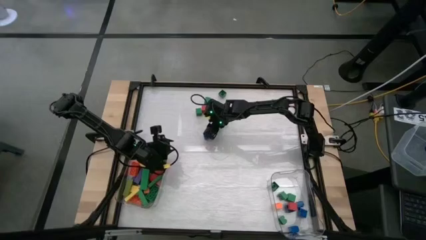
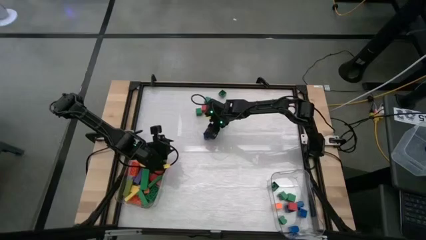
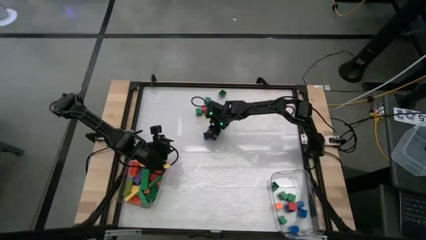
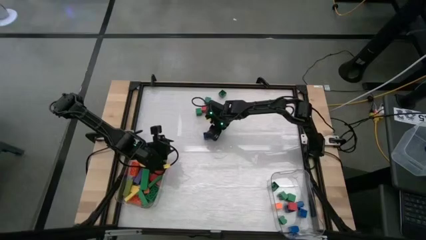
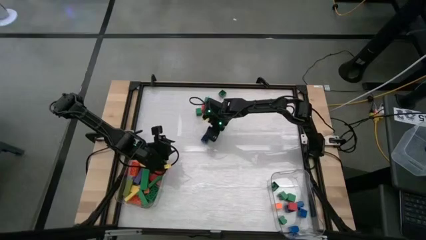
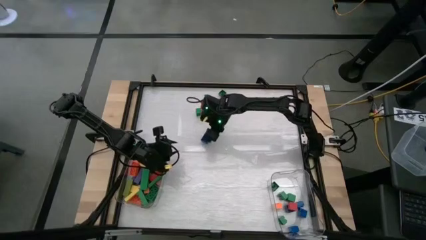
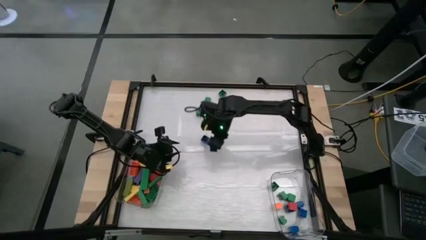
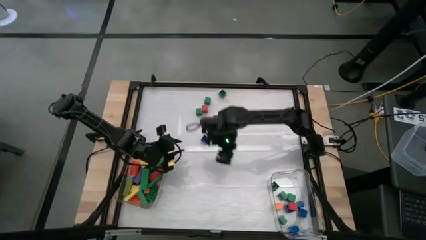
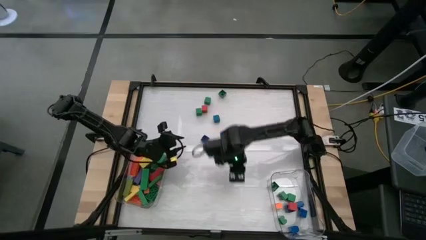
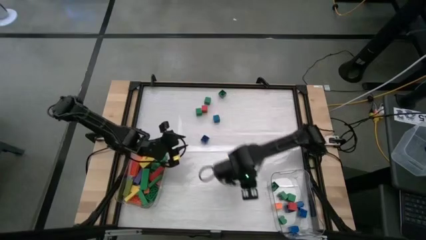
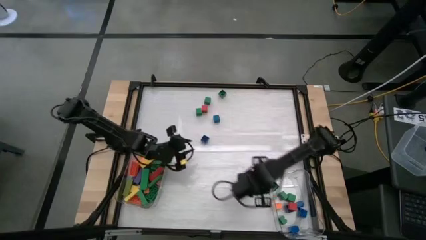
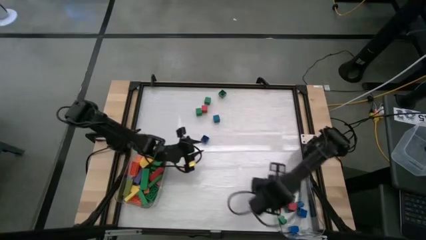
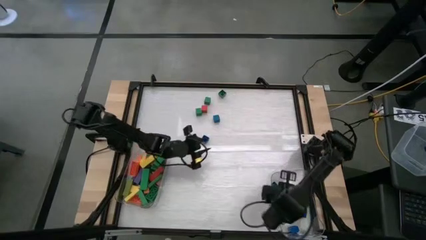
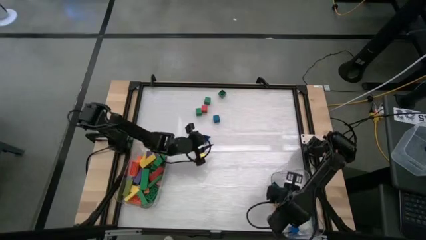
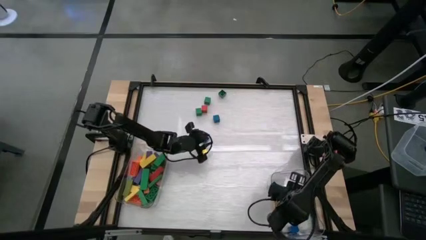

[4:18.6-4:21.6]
Task: Sort blocks by size
Put the small blue game piece into the right transparent bin

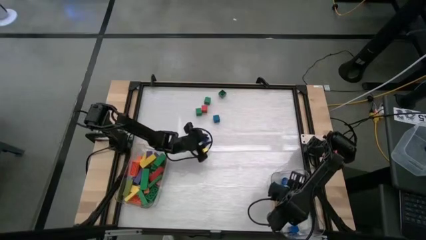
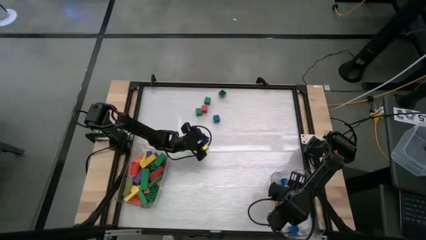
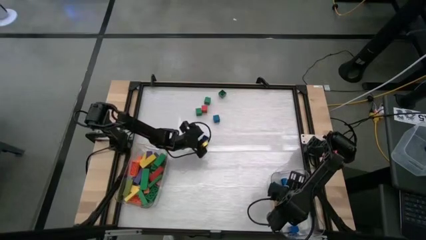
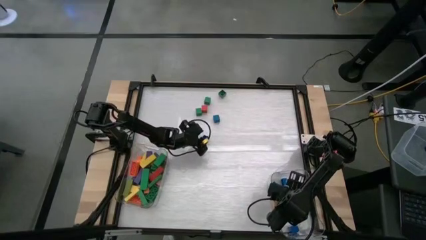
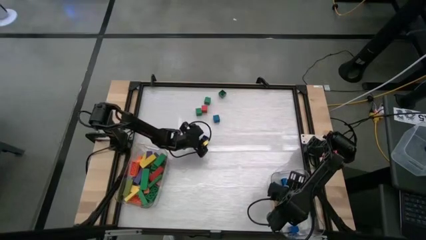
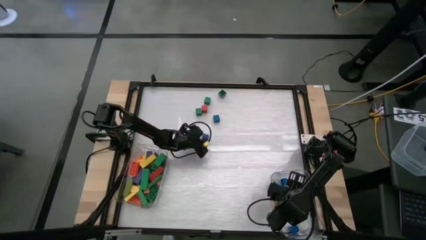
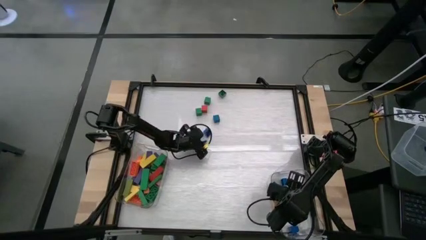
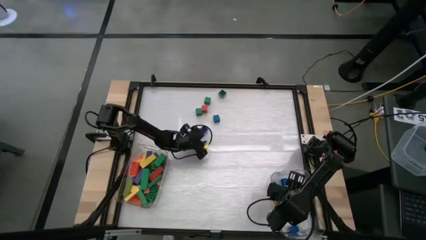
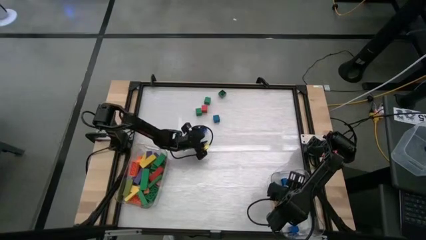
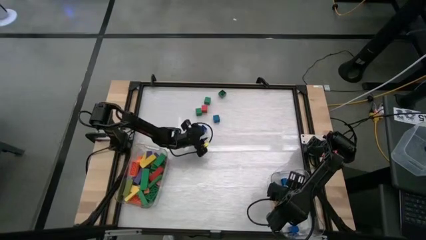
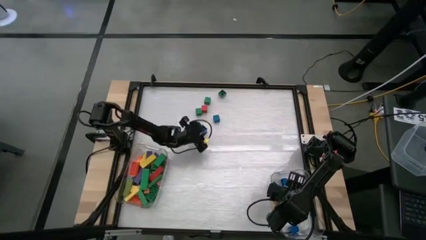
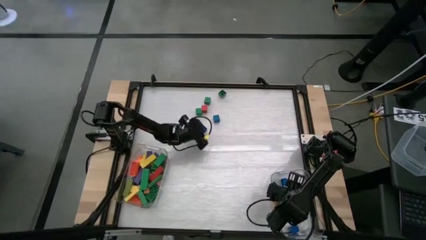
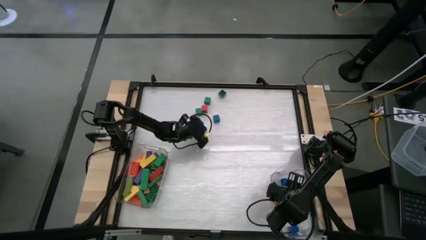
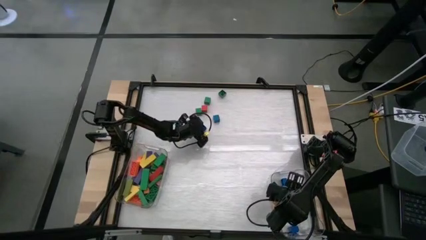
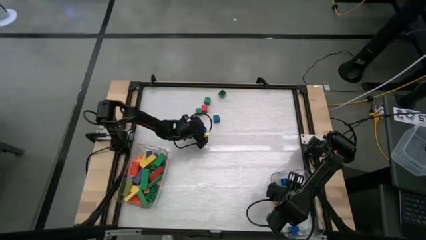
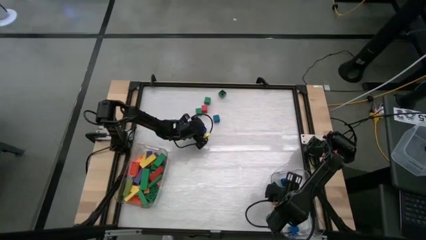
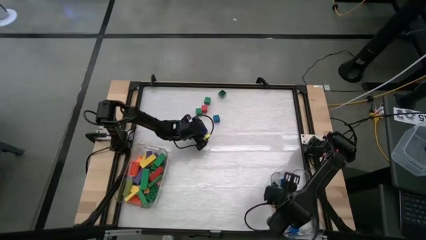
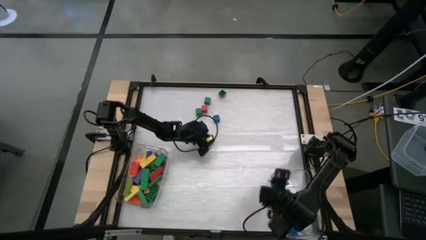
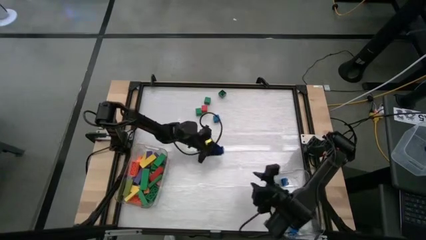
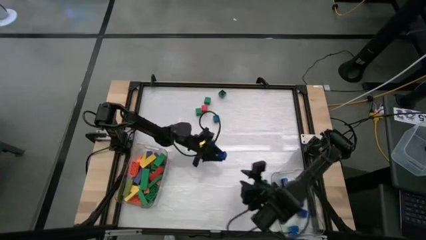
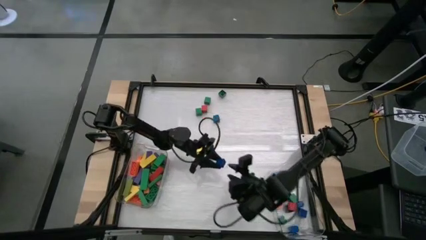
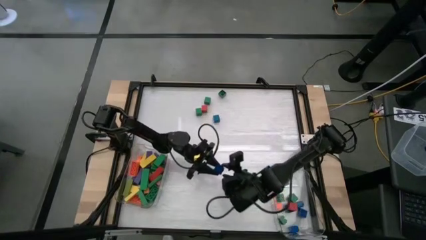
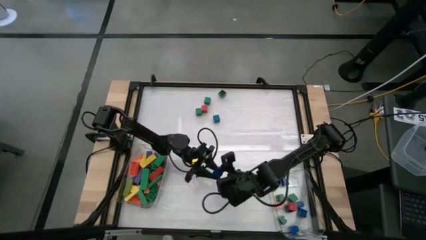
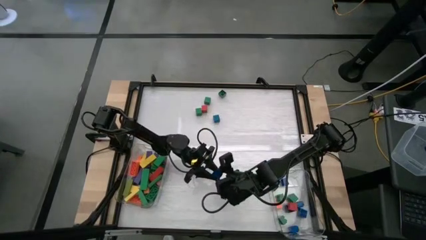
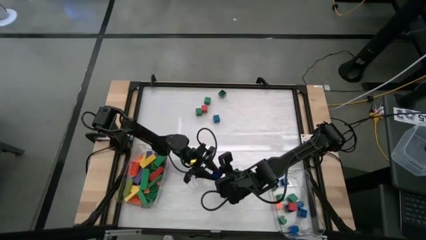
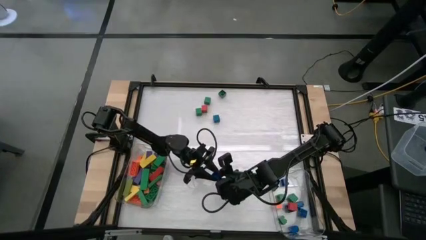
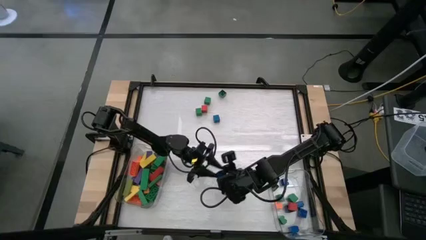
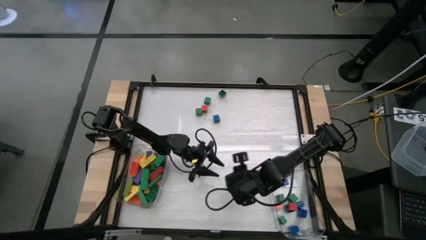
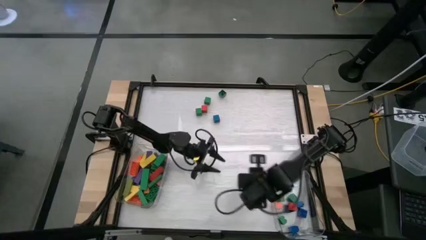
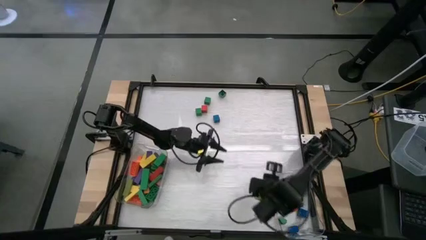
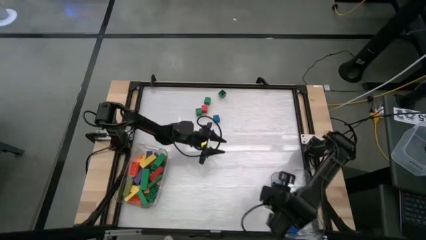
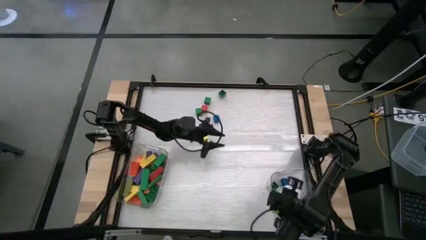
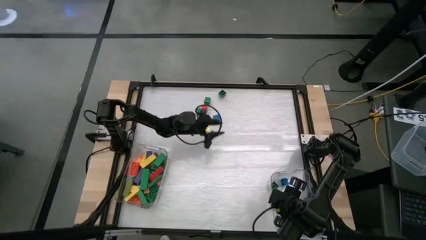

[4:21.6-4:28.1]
Put the small blue game piece into the right transparent bin

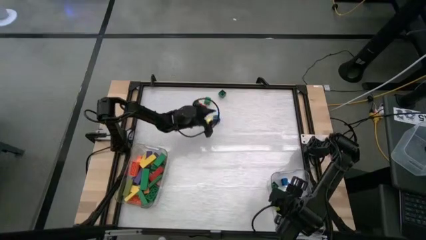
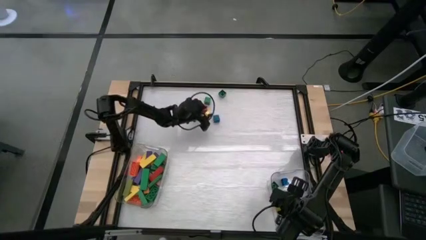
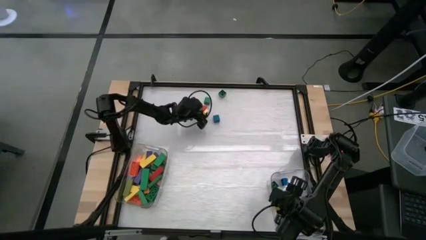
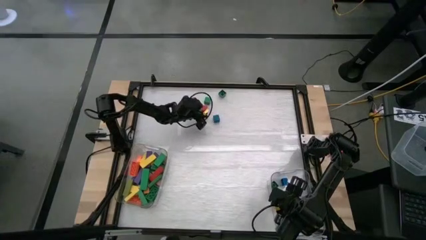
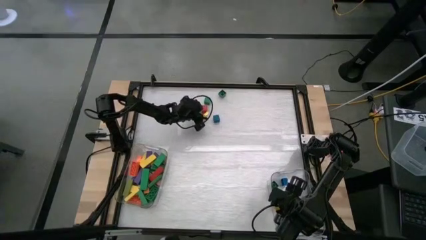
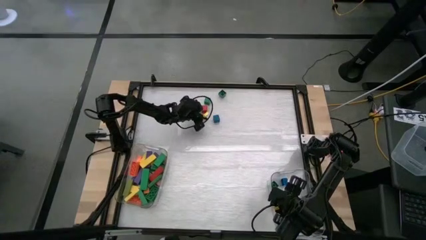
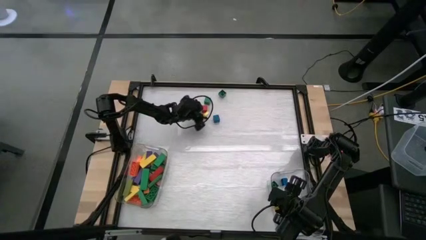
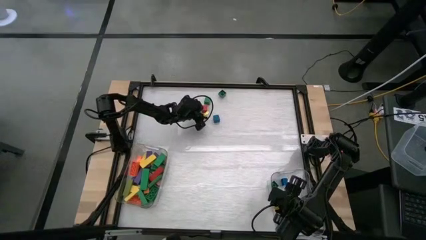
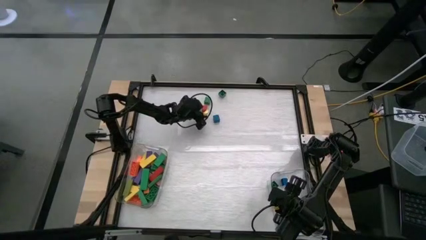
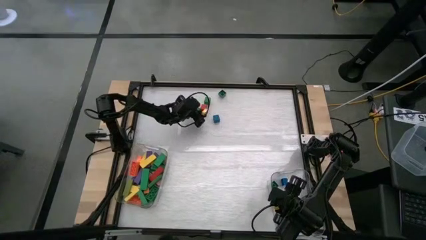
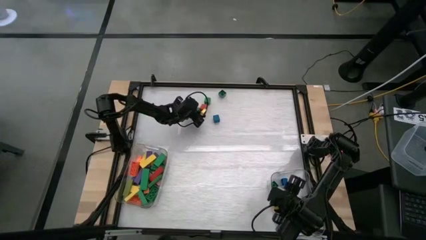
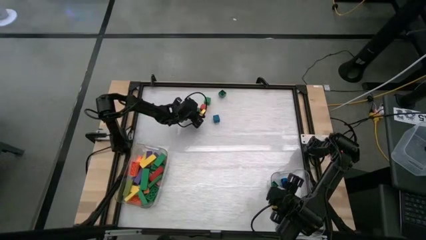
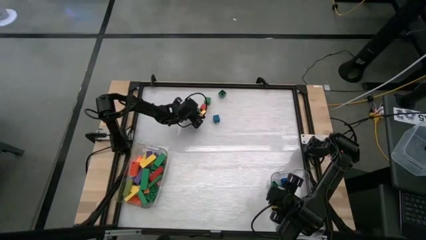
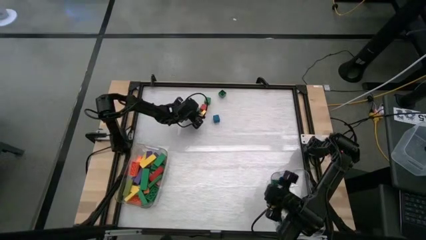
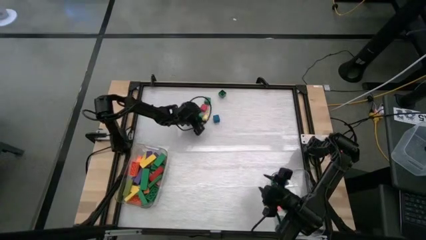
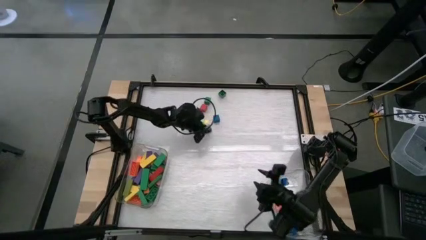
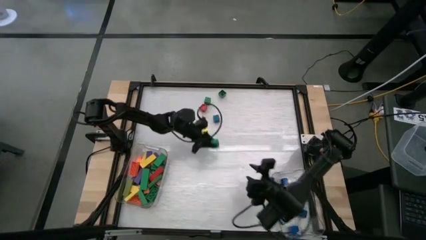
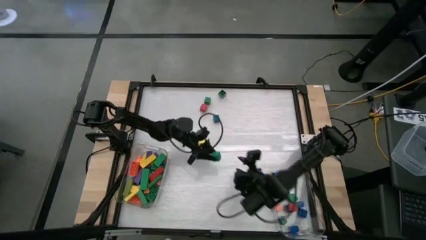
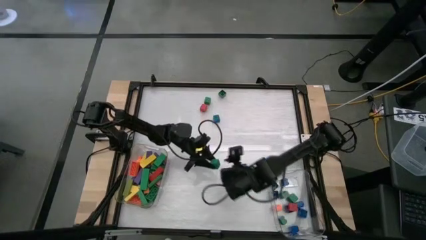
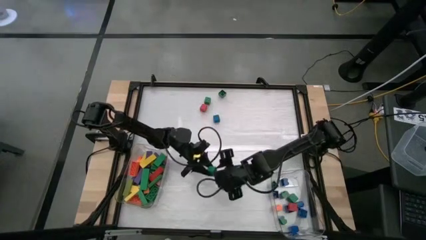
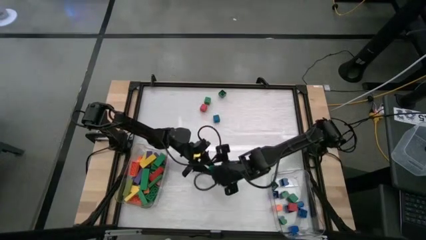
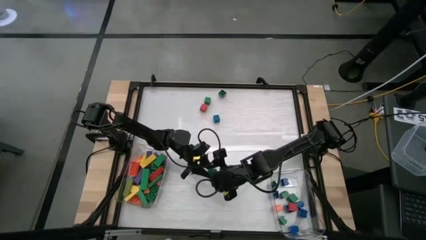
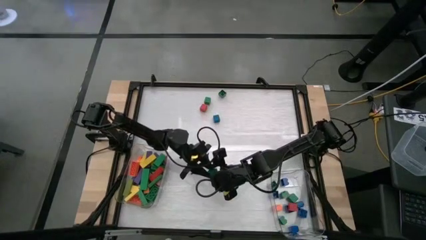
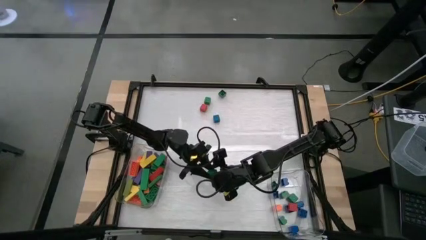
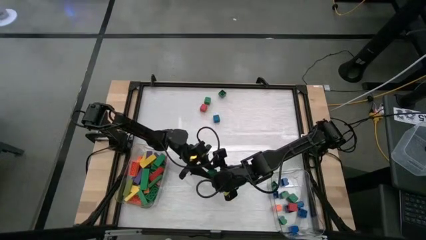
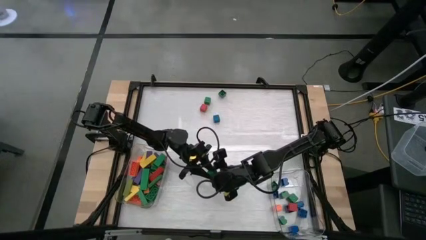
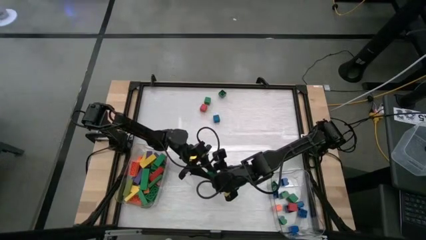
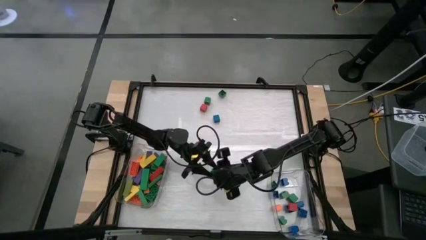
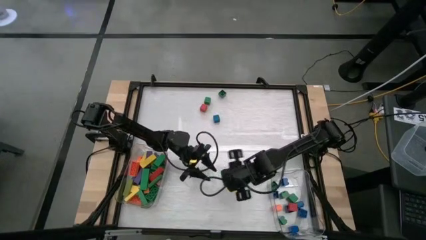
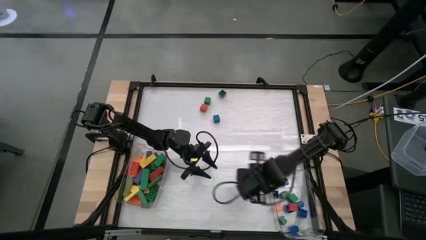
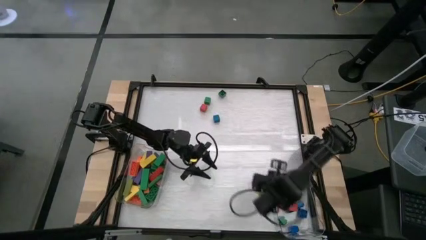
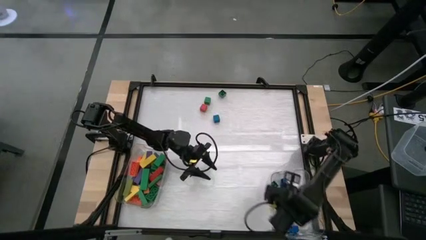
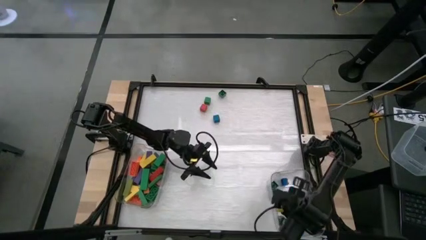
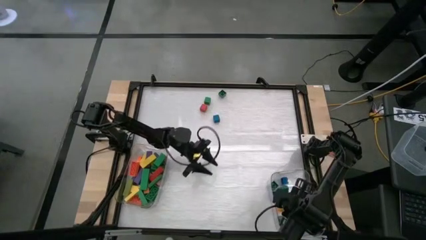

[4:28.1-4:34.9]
Put the small green wooden block into the right transparent bin
